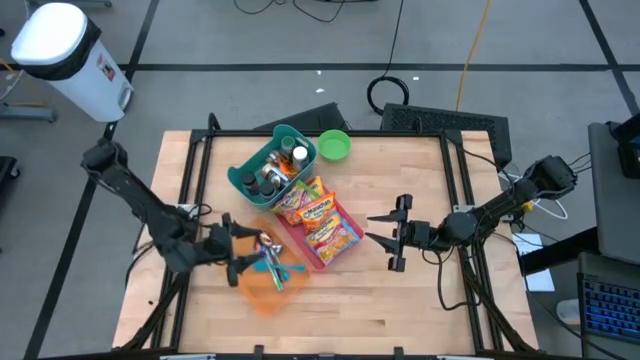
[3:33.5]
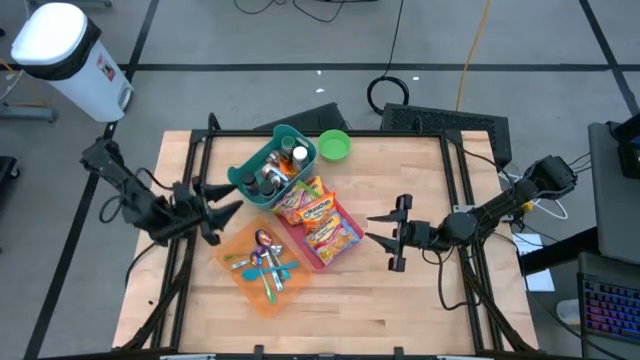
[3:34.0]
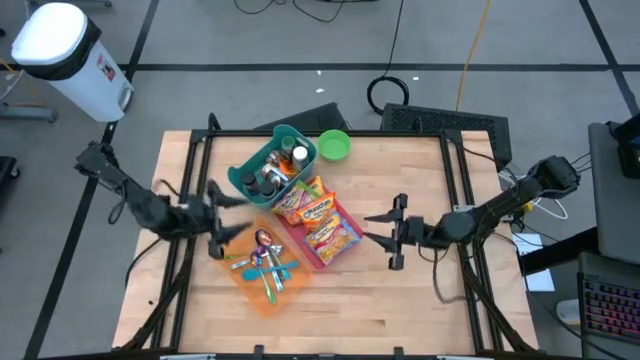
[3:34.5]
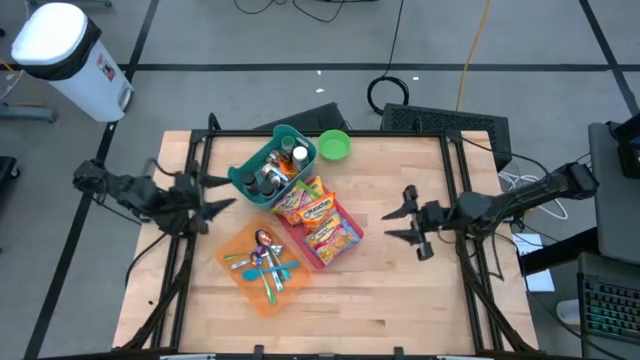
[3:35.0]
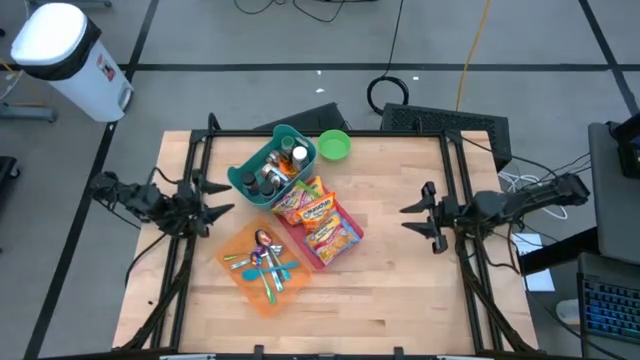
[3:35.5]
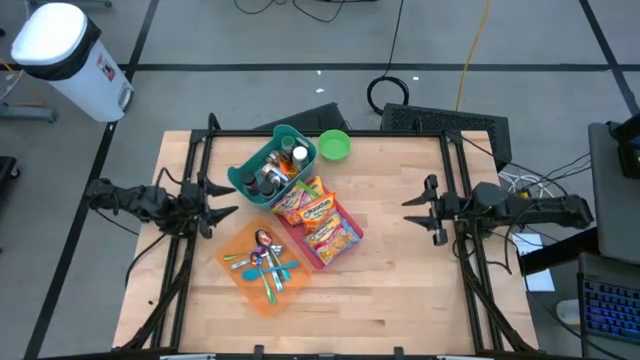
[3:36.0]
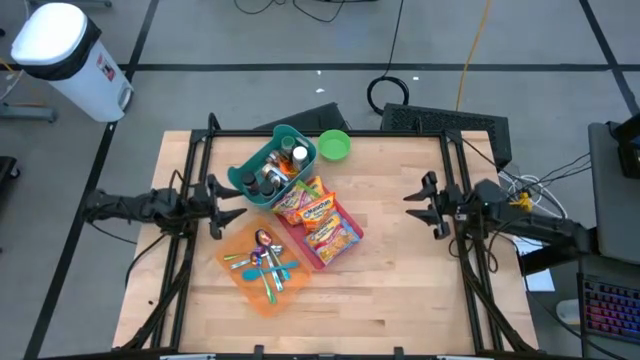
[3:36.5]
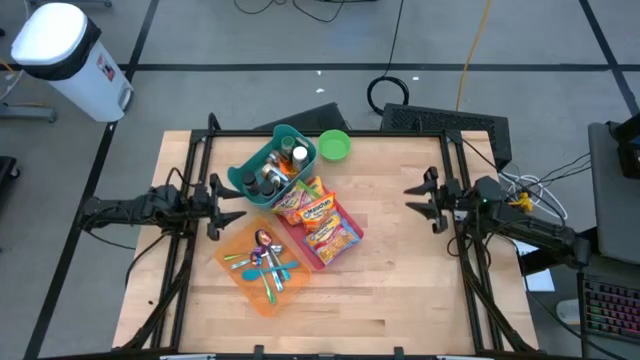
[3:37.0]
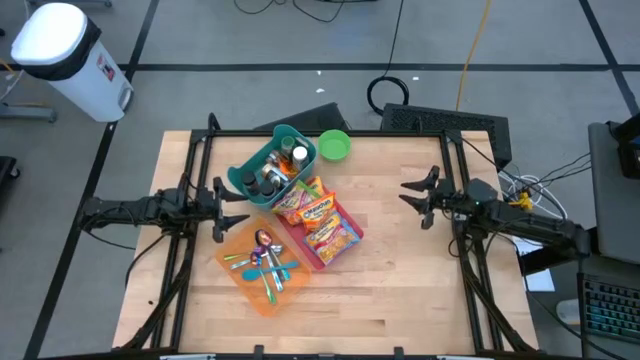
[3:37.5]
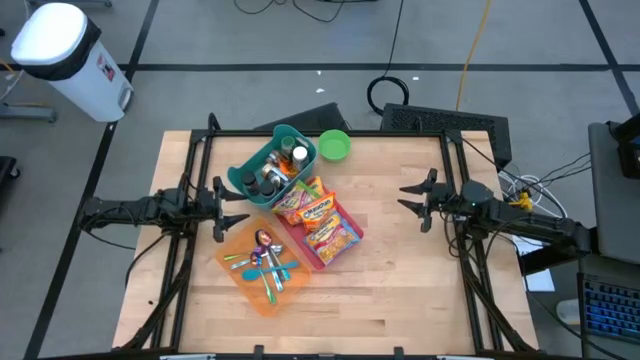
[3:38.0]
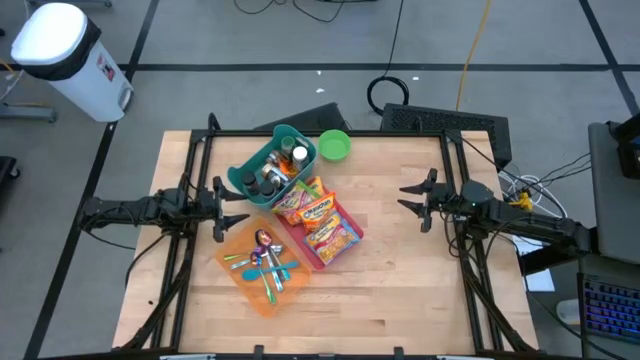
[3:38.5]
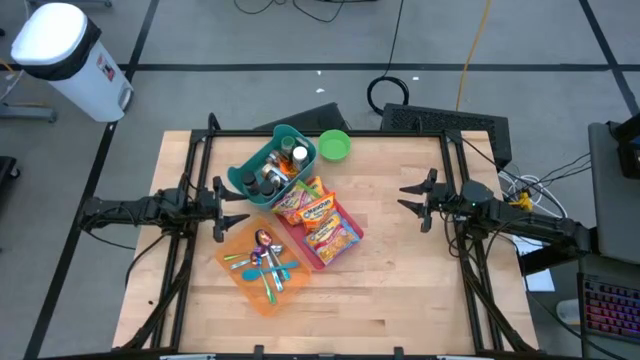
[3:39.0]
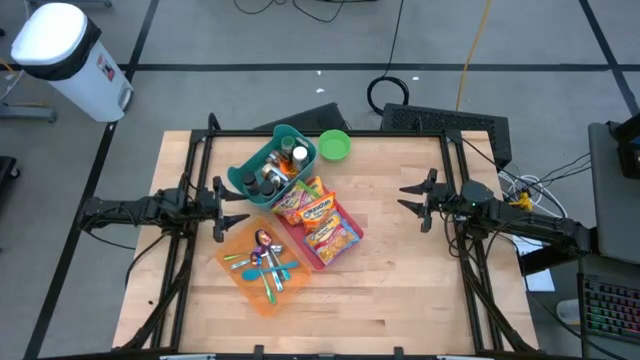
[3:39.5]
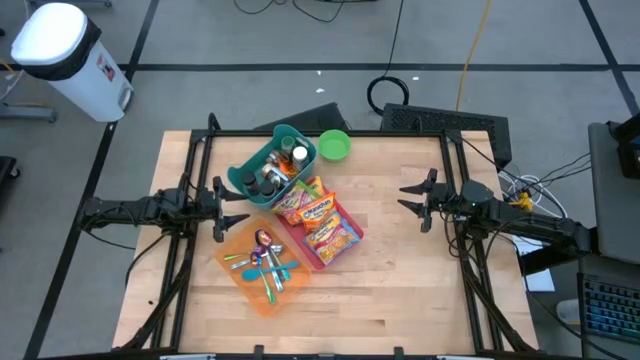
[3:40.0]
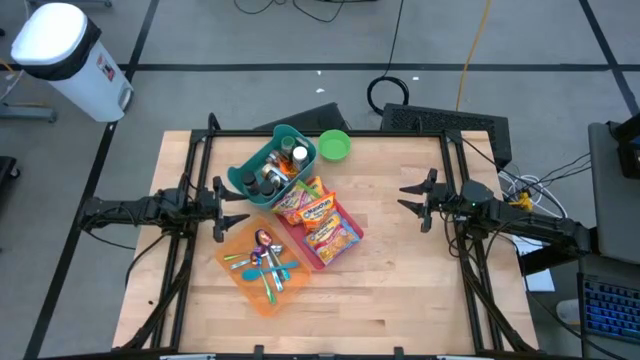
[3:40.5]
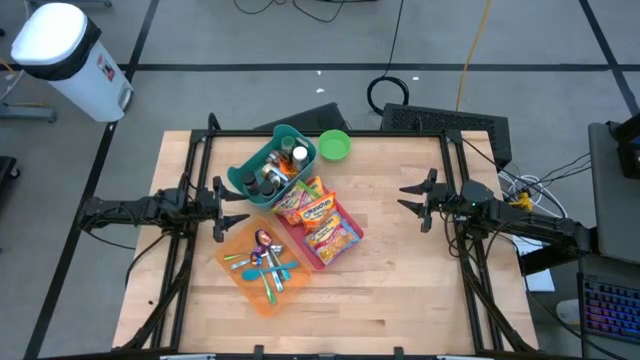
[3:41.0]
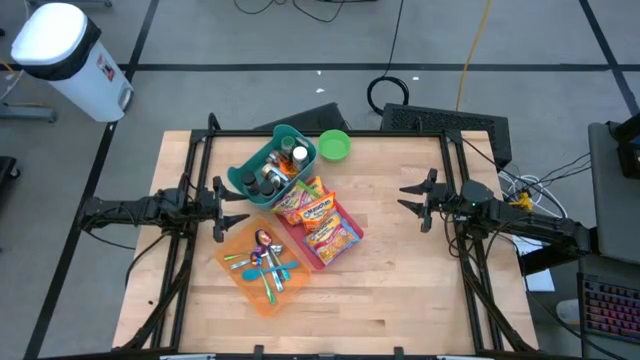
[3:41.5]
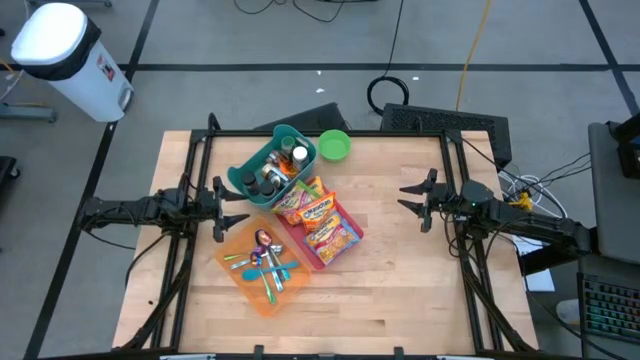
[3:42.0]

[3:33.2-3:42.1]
Task: Pick & Place Food Item
Return to Home Position

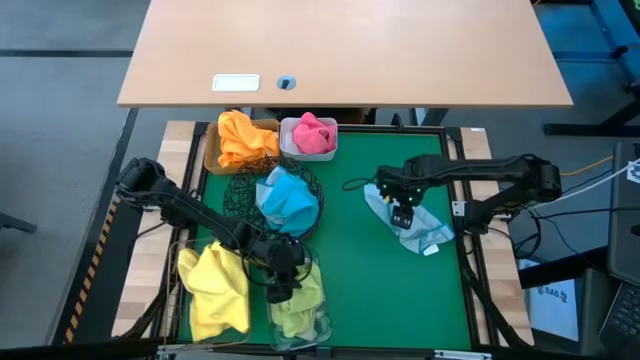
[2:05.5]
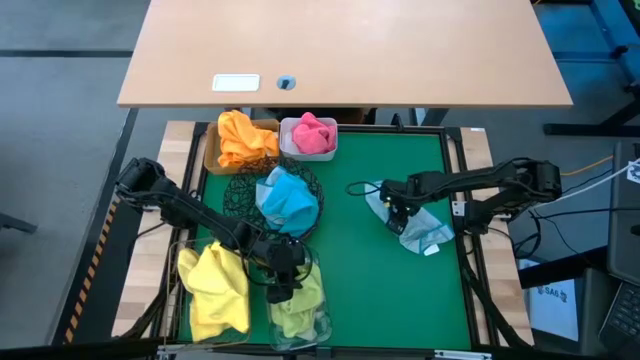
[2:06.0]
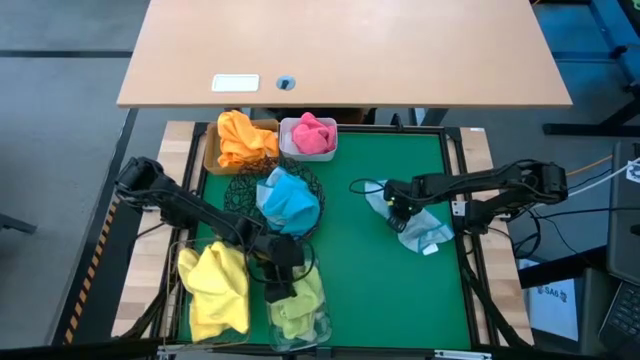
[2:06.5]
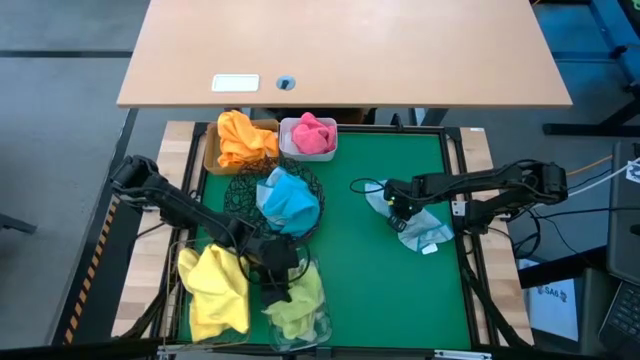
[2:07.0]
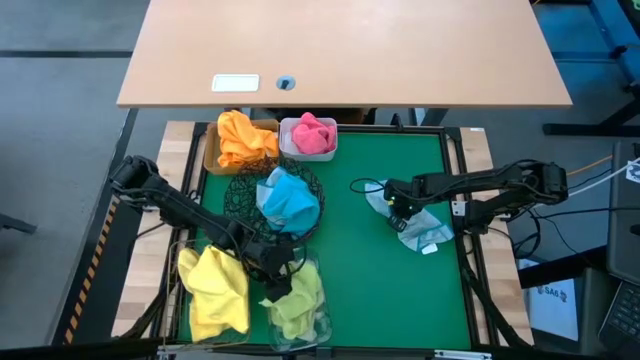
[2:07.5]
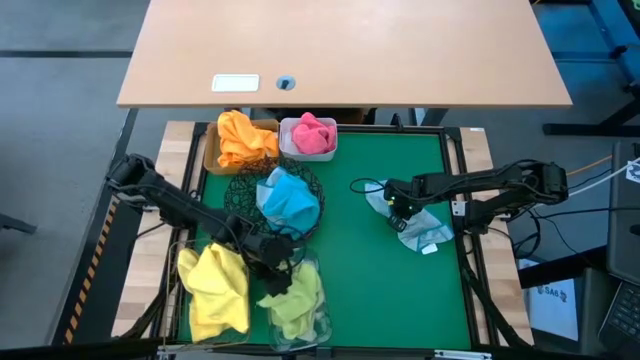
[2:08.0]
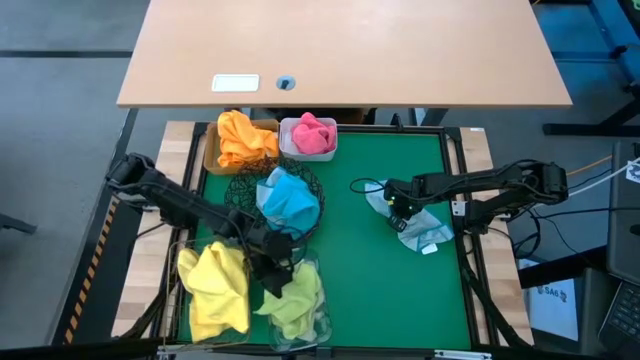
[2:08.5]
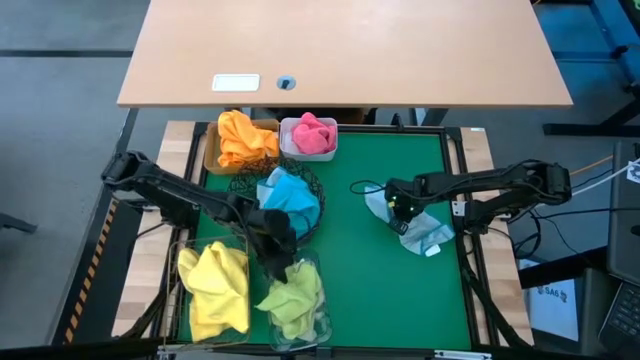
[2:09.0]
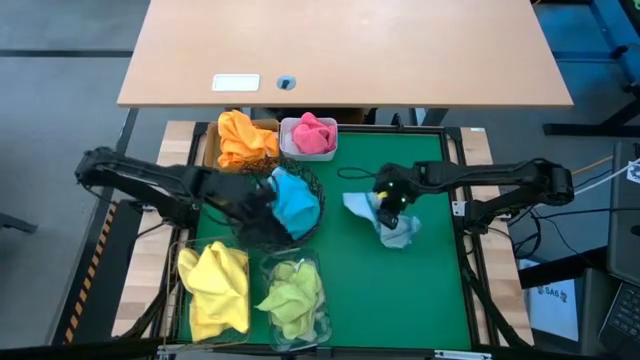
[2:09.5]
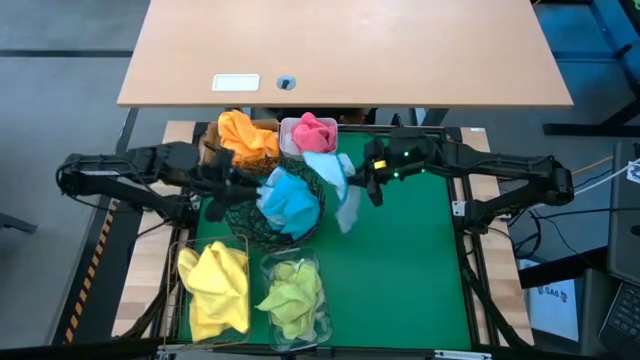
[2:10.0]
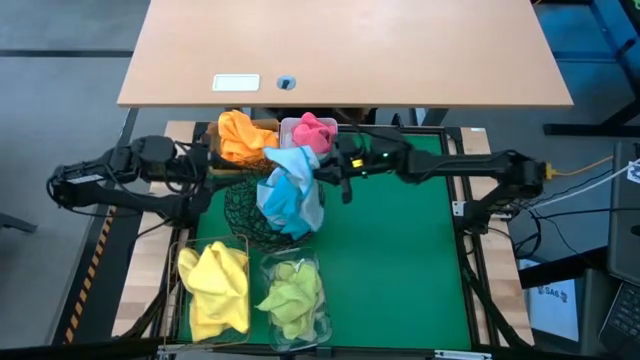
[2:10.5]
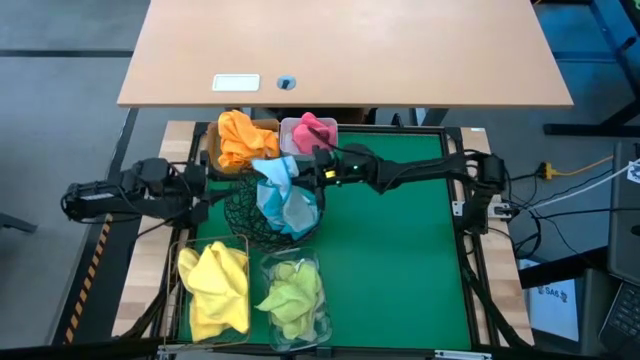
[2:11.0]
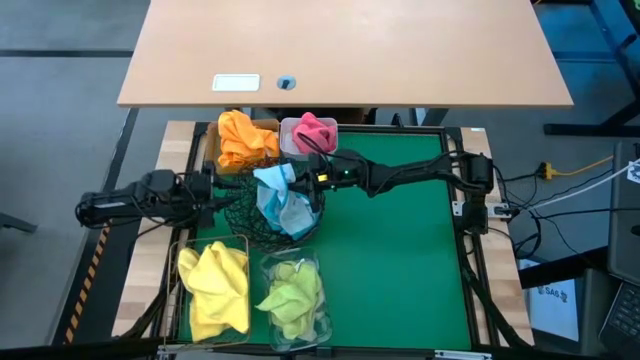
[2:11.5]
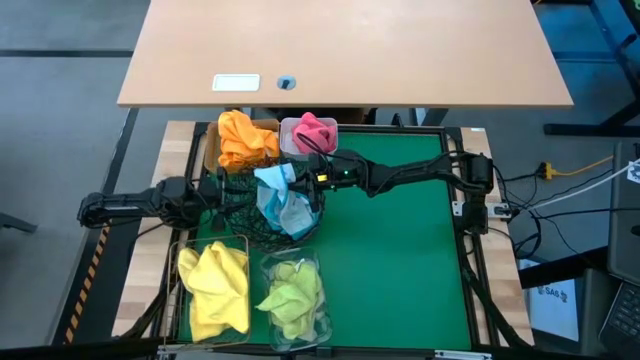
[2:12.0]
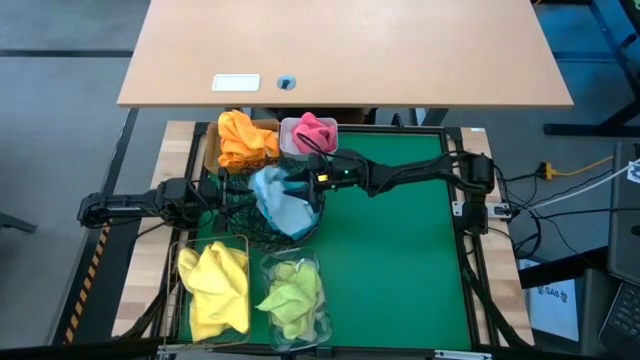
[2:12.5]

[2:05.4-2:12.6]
Task: Sort microfiber towel by color & place in baskets
Put the light blue microfiber towel into the mesh basket
